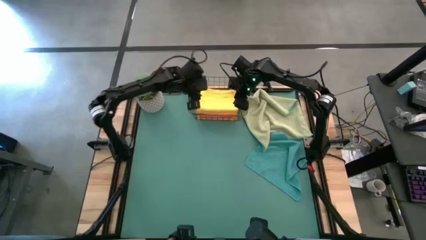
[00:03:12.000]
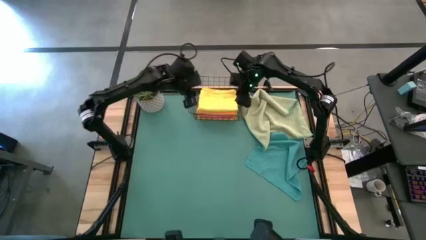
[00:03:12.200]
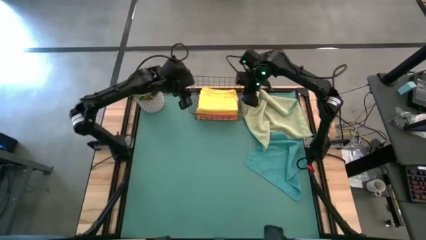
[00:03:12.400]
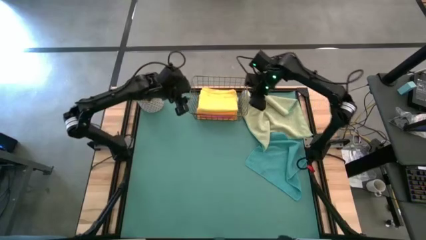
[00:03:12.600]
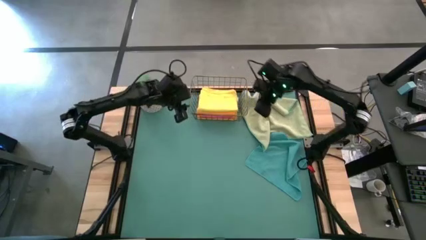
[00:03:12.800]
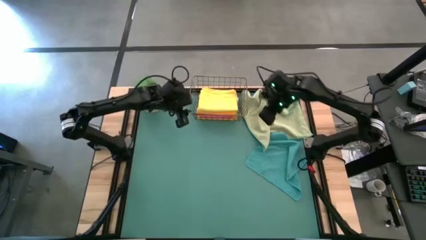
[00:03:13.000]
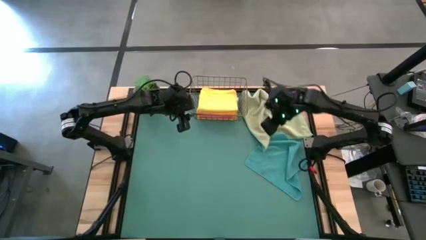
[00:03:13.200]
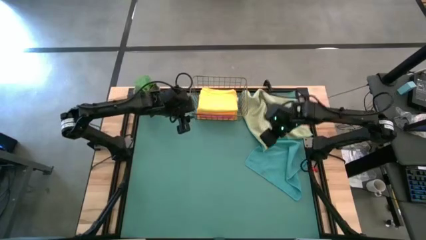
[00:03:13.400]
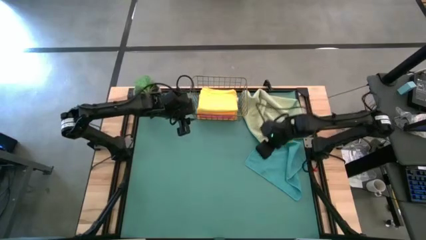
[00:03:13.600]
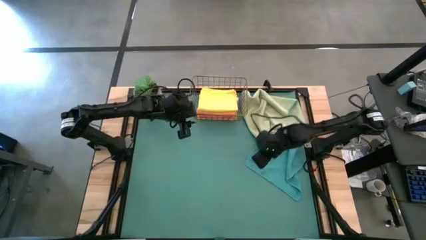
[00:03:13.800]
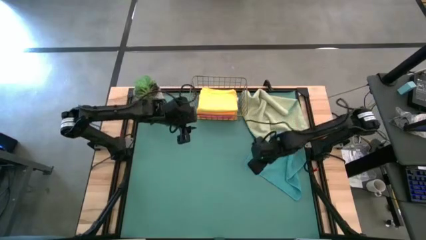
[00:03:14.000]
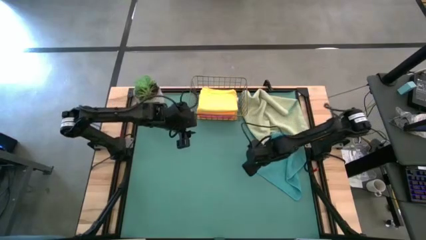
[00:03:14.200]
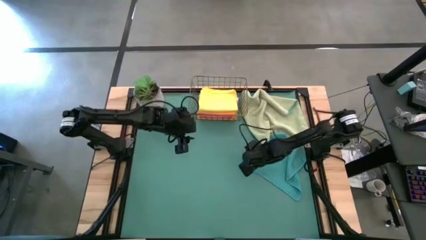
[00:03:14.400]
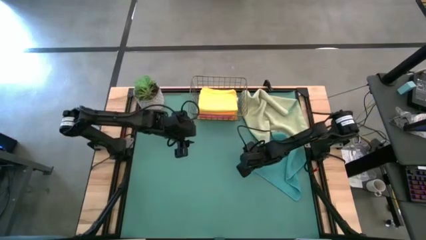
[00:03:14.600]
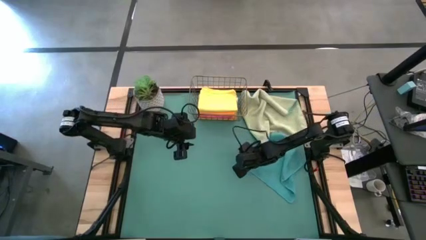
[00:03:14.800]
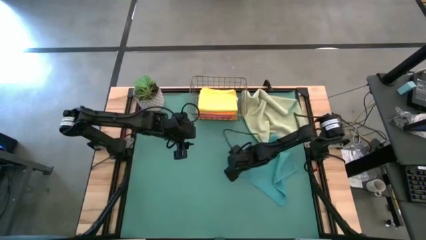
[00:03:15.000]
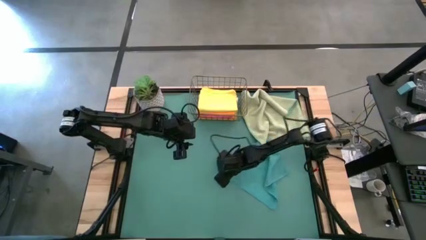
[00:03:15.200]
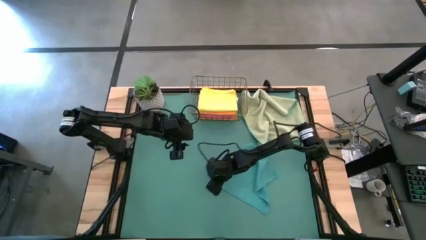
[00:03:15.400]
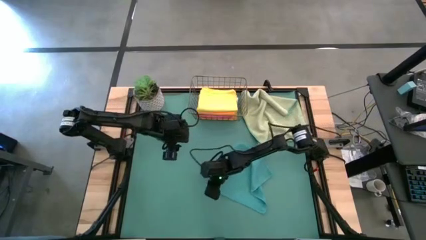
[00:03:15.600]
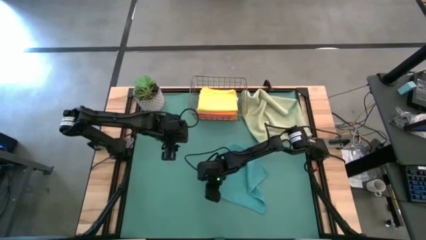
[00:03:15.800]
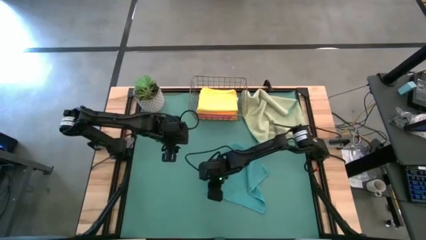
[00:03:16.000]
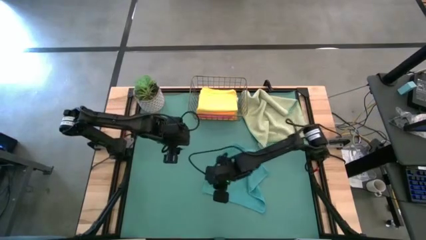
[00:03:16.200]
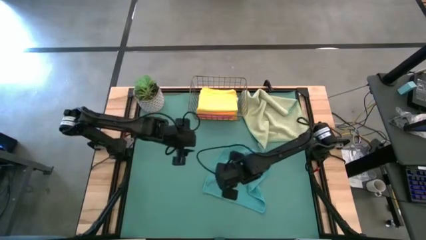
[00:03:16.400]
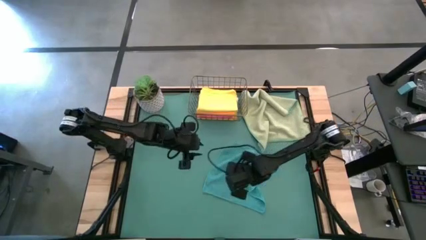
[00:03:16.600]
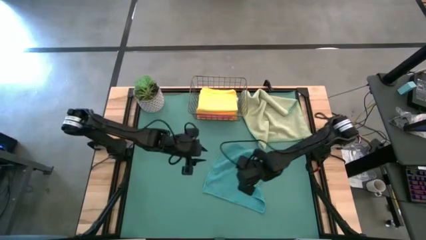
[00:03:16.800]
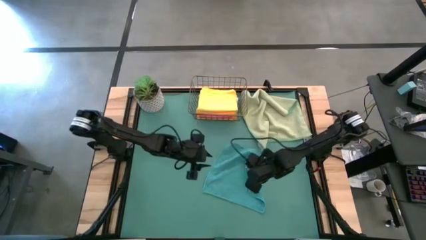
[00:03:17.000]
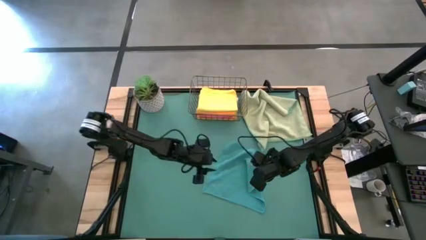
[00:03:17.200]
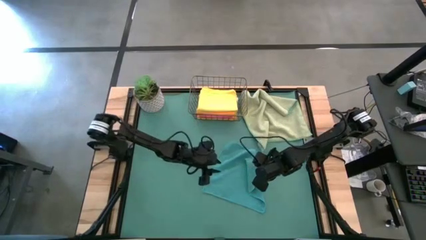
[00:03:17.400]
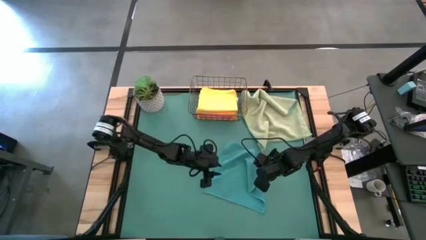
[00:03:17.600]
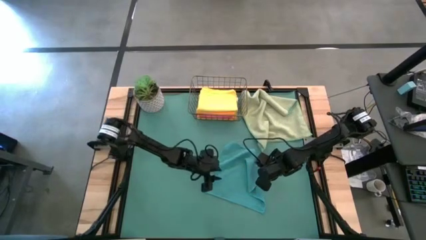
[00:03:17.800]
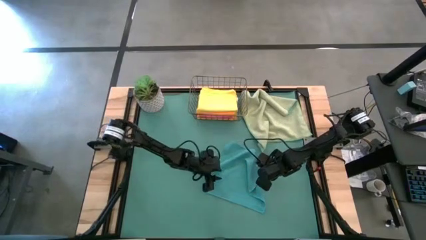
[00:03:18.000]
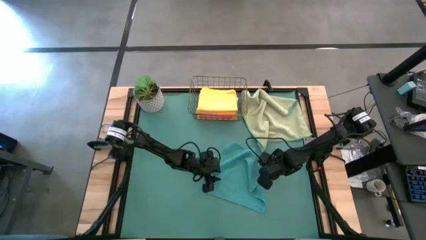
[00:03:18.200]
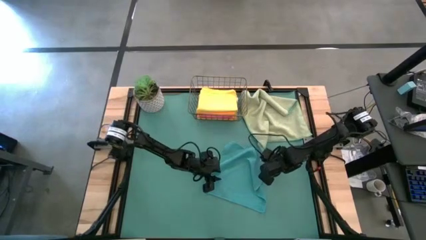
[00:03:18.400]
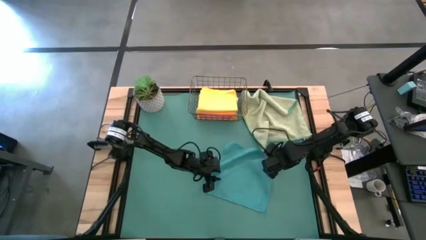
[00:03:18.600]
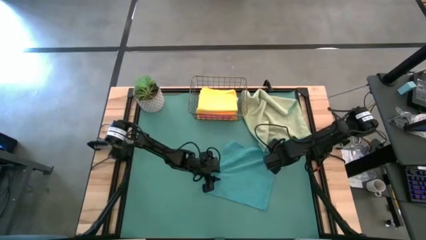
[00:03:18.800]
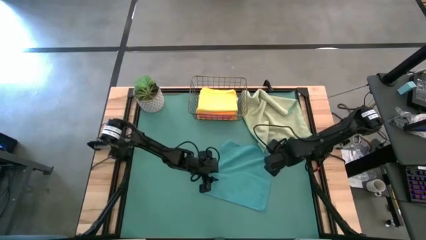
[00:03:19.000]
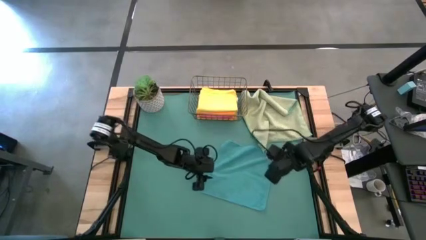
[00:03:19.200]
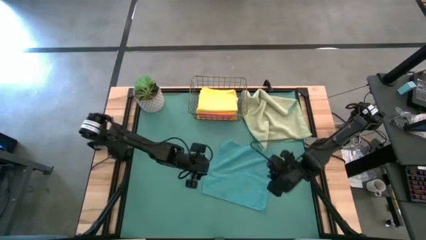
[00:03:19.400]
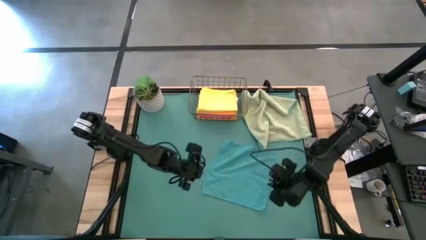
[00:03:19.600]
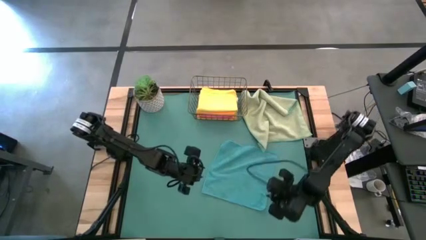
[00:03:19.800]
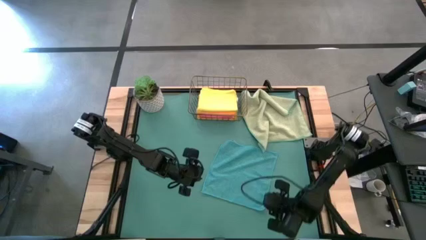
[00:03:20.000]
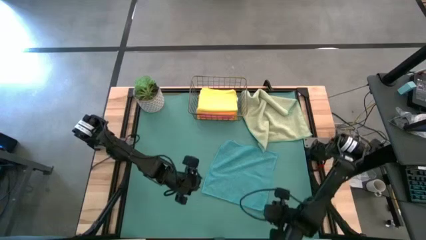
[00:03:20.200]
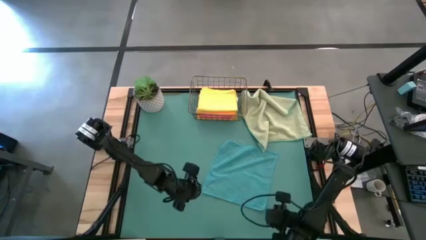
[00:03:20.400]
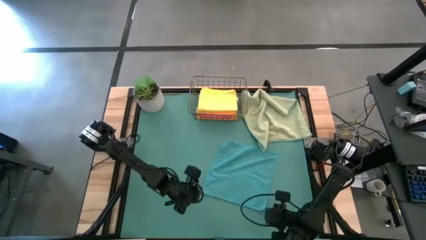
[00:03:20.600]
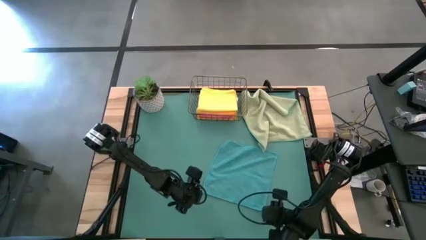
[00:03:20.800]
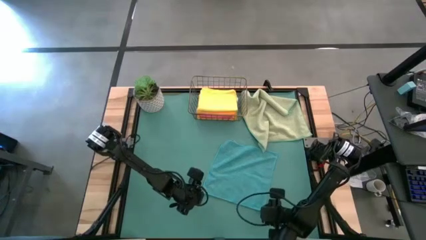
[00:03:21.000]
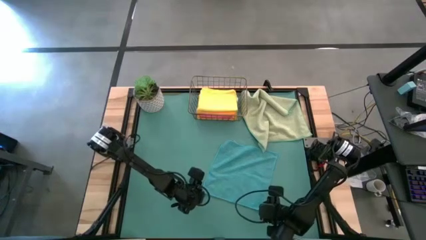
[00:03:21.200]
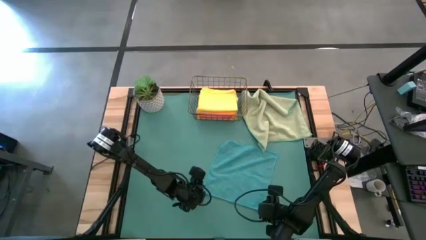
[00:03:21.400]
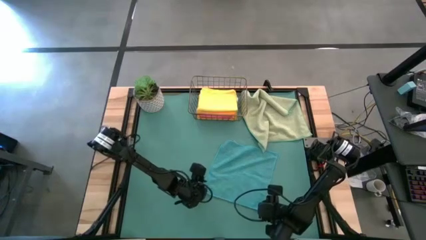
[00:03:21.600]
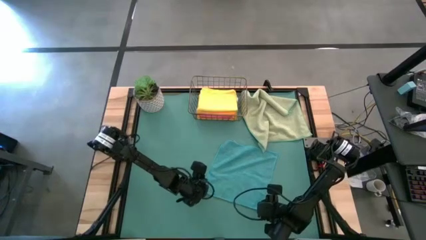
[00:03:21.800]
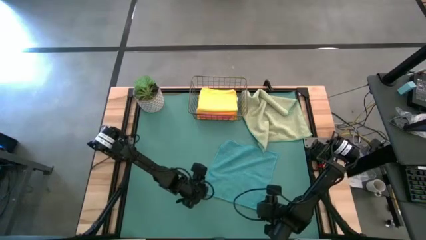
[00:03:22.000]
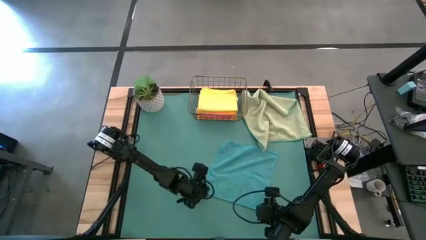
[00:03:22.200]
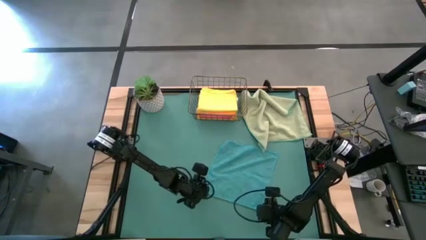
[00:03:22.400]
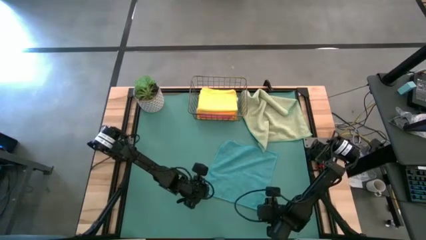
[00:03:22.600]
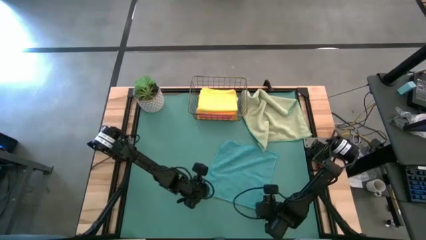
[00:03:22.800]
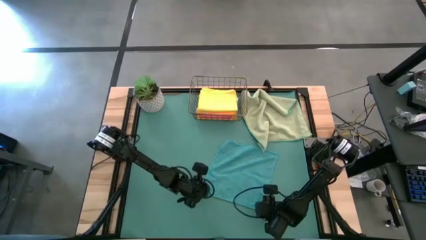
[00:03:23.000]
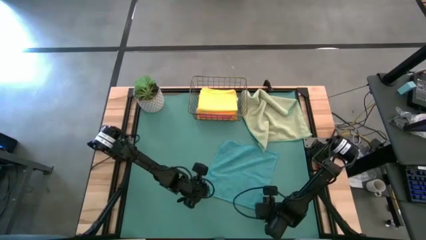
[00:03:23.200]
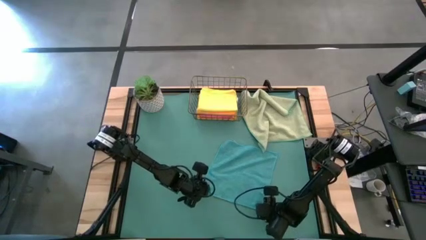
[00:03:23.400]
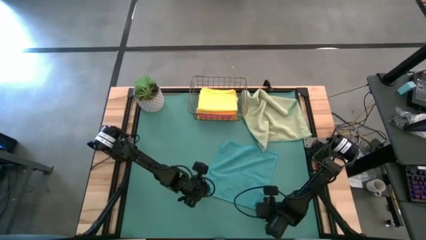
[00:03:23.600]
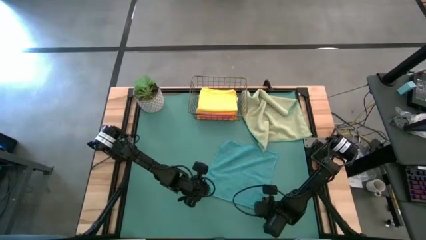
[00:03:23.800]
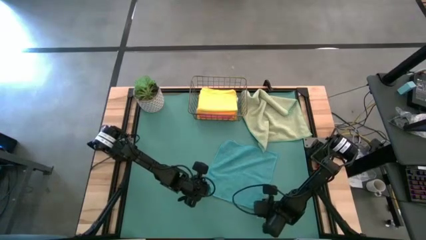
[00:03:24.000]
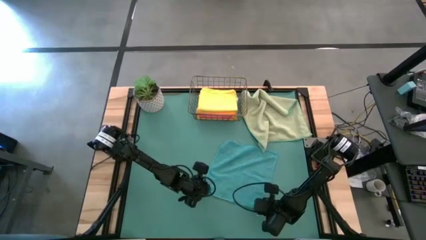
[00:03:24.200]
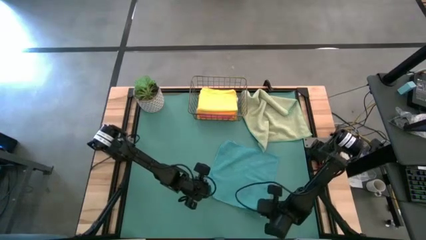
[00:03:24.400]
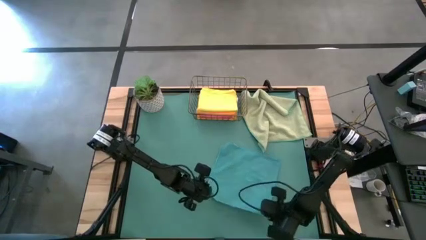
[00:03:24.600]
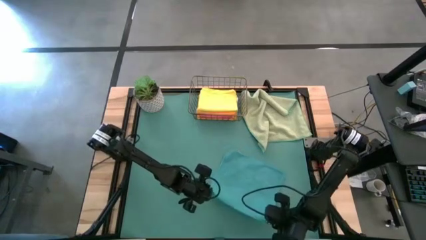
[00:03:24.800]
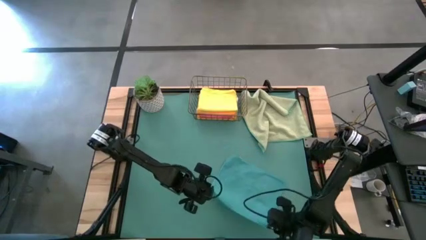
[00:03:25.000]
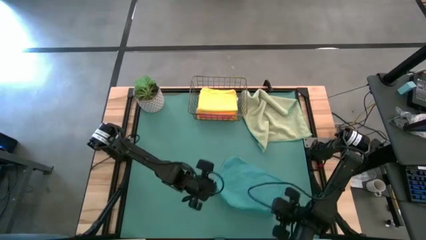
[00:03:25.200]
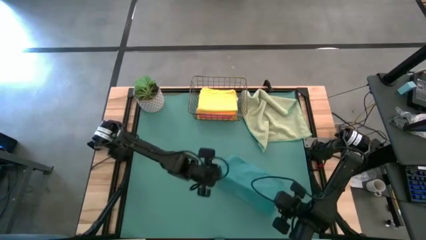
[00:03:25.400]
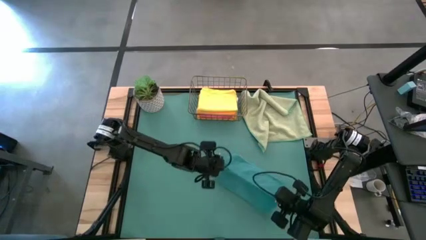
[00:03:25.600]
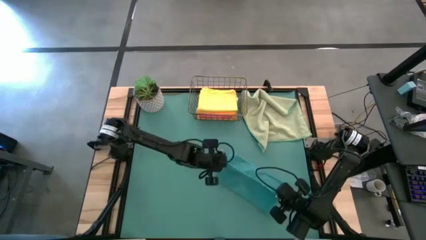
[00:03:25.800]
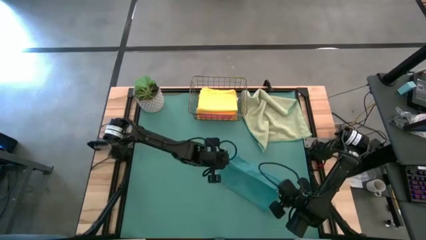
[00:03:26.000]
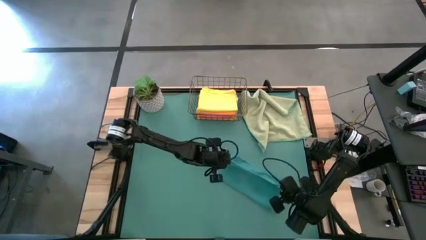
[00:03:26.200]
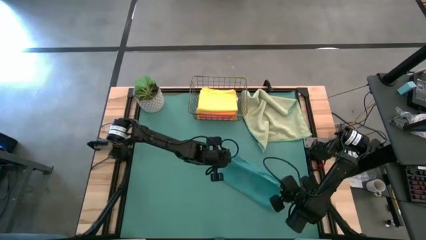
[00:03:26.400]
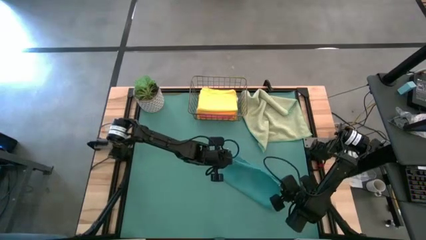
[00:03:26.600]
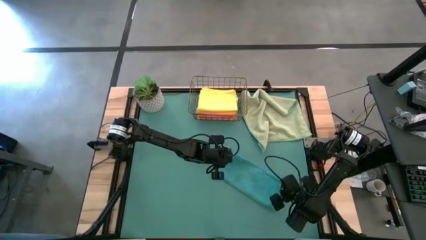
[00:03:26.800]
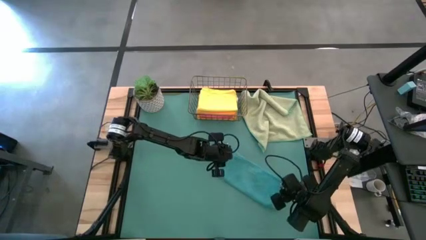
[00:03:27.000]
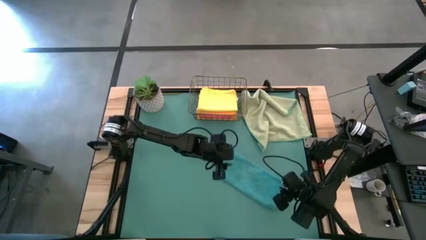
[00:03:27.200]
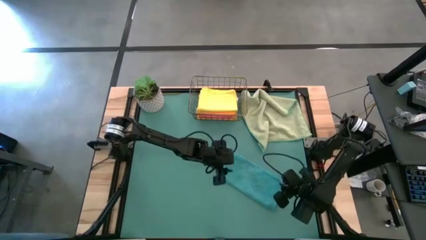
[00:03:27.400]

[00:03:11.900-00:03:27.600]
Task: Fold microfiber towels
Fold the blue microfiber towel
